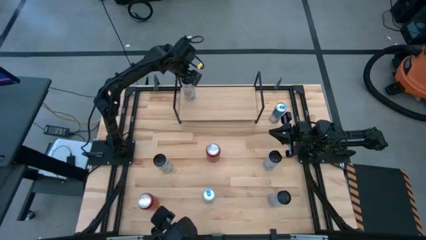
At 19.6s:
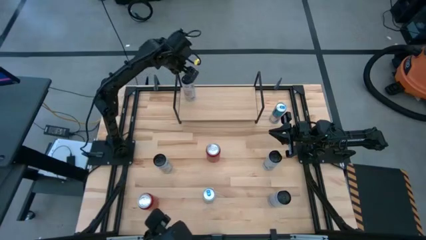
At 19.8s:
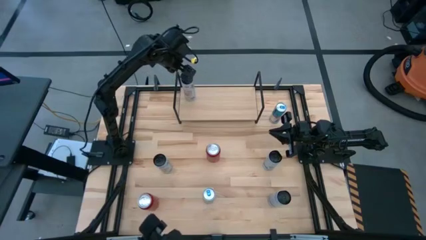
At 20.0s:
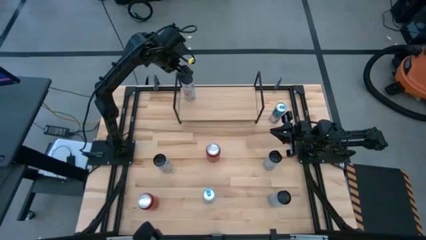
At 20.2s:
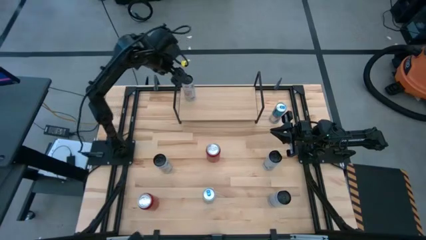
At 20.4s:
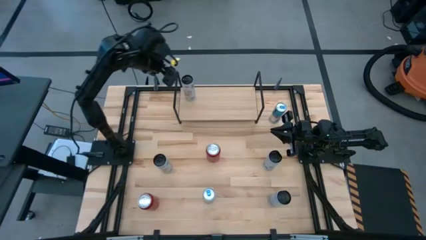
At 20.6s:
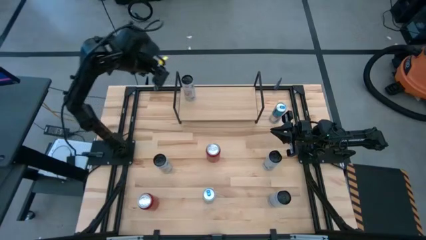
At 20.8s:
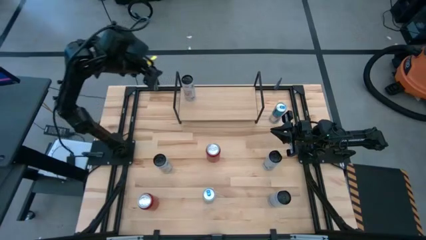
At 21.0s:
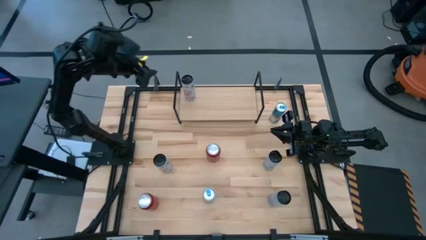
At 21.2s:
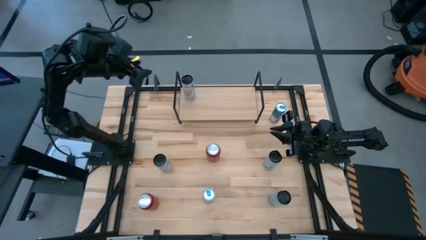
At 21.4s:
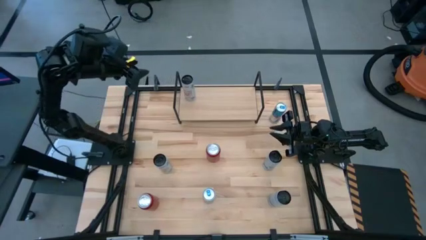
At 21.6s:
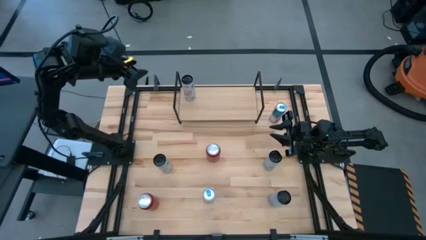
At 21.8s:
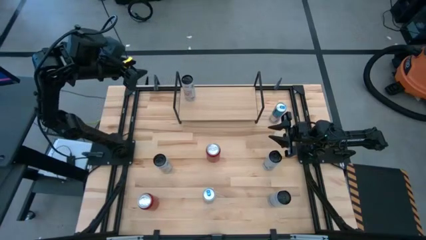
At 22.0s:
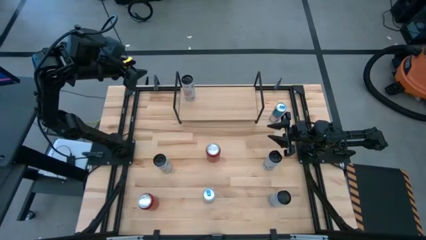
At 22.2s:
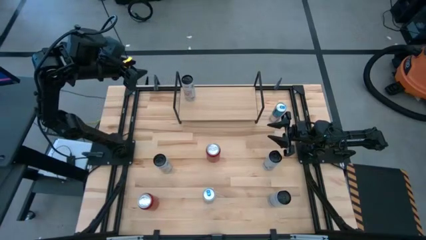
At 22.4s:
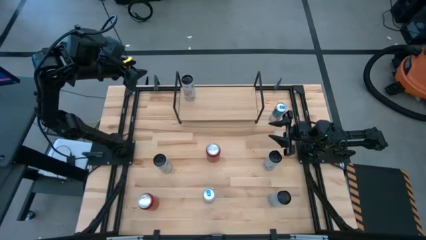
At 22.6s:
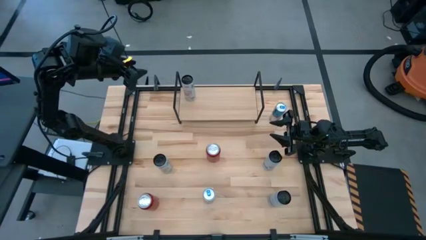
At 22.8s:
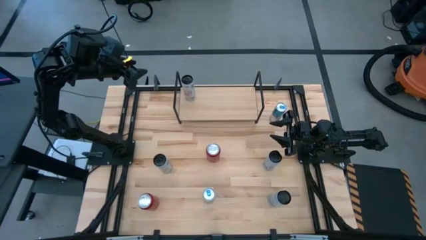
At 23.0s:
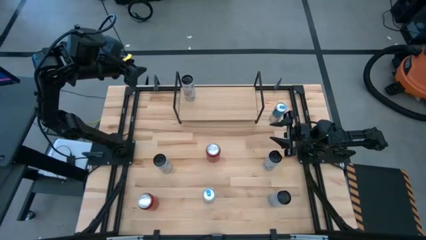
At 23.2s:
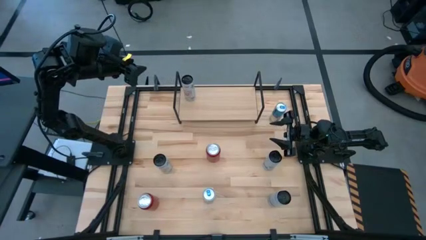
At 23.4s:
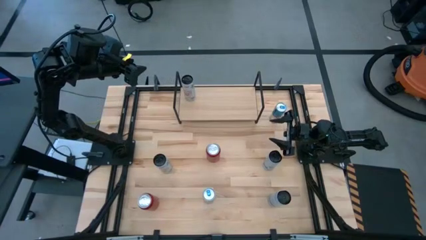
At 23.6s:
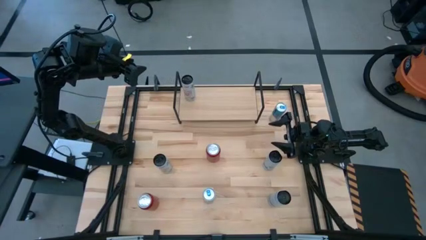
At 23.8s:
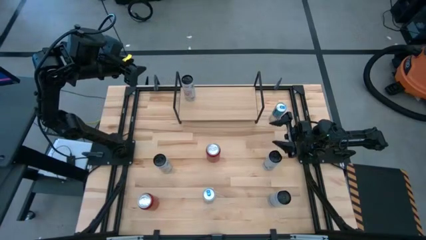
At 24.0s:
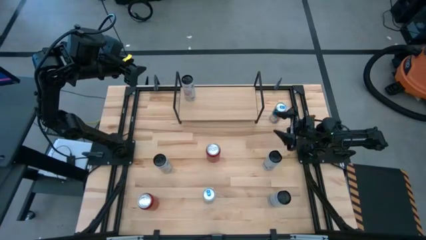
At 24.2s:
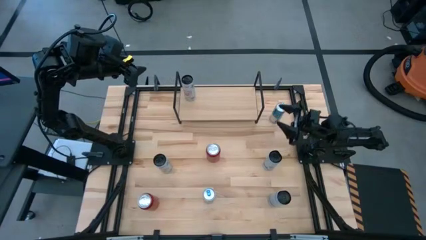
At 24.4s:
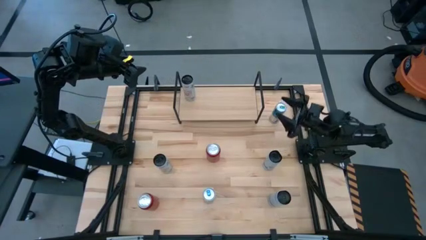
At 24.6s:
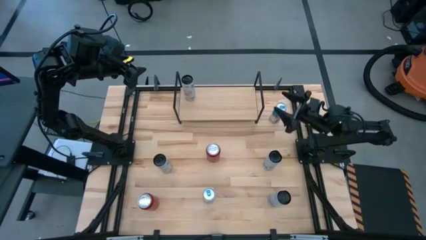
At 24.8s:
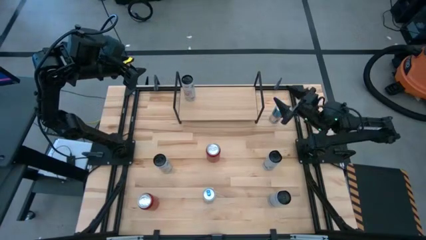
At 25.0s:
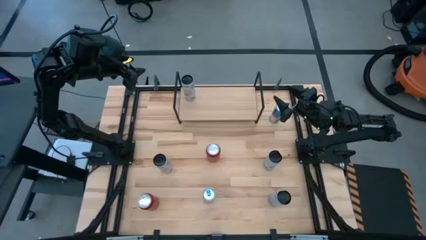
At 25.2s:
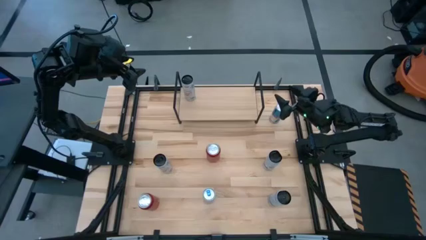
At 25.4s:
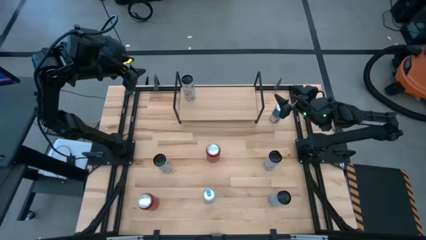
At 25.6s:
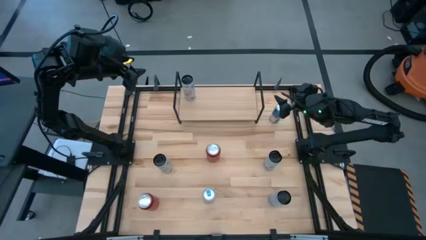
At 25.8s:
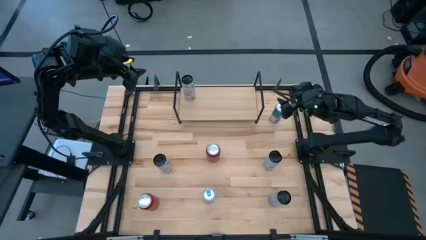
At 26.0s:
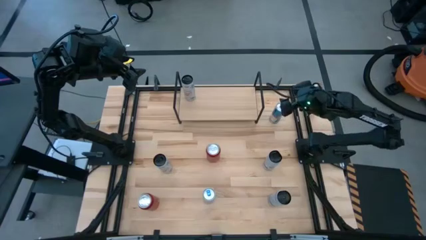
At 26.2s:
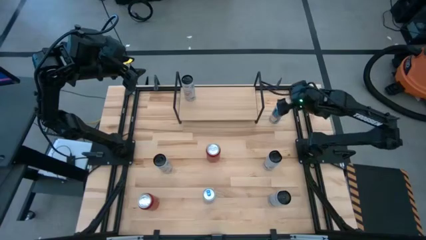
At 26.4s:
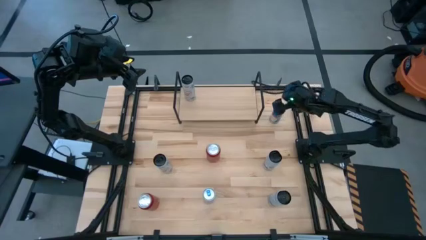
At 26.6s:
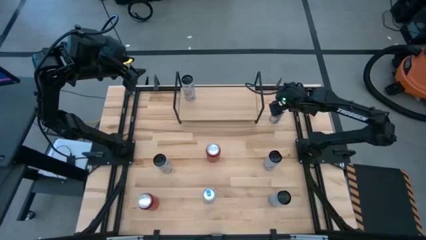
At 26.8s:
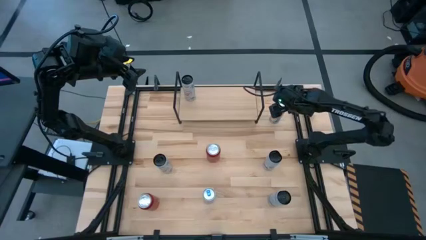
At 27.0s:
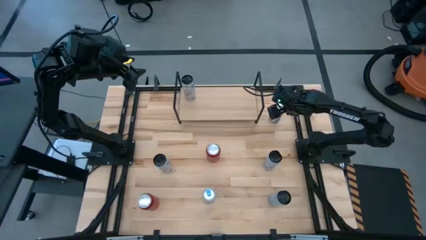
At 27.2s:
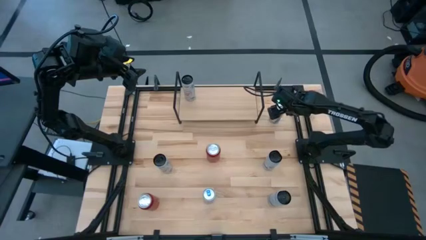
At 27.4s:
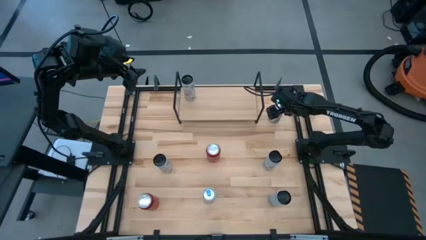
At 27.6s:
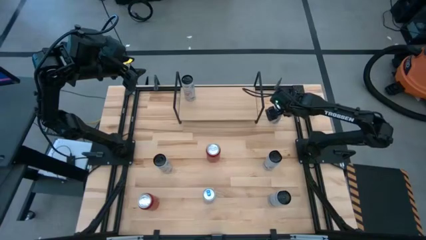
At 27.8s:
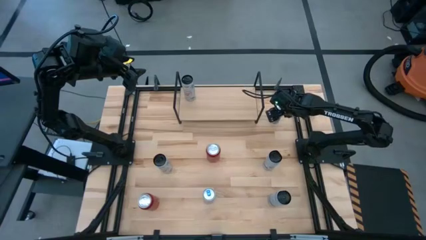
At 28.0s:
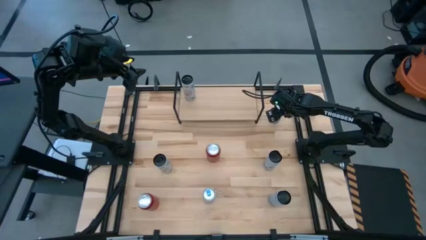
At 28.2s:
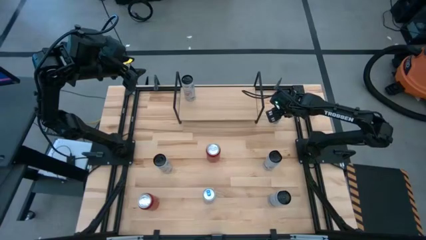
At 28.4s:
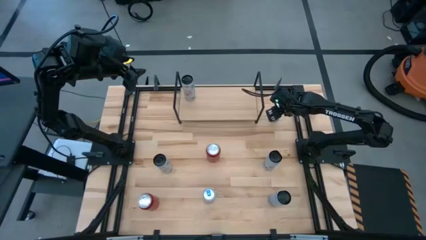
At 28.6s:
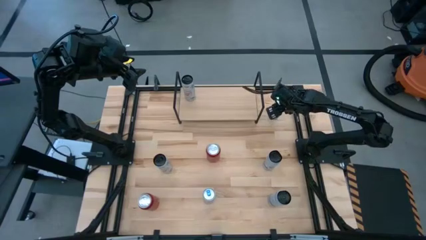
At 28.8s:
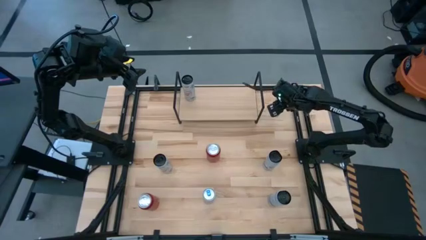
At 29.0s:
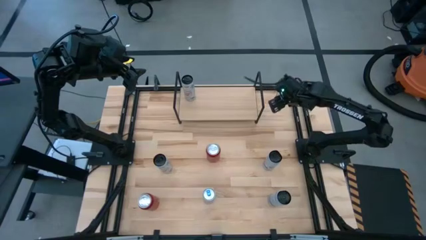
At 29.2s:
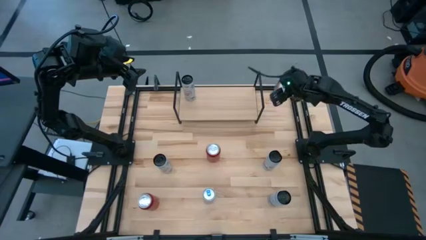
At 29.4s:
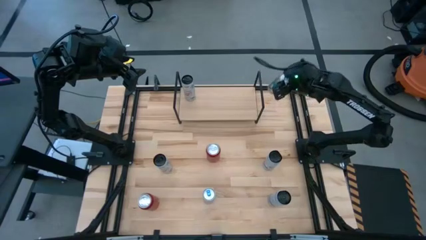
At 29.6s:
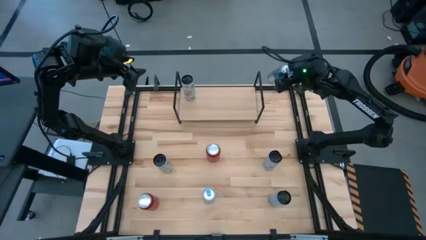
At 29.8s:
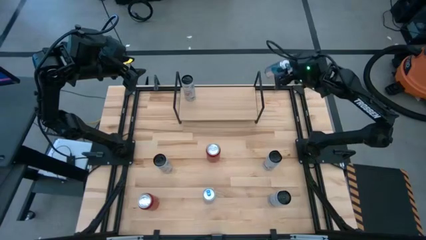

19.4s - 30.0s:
Task: Place canned beverage on shelf
Put the right blue soda can on the shelf
